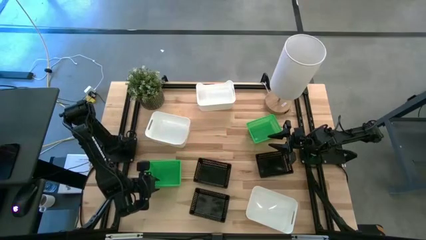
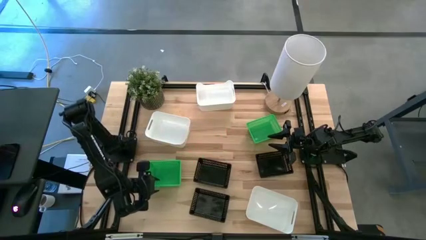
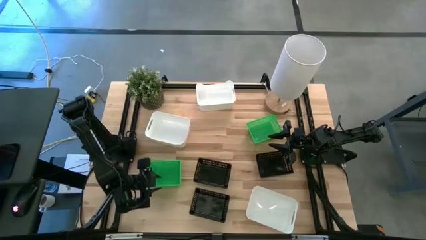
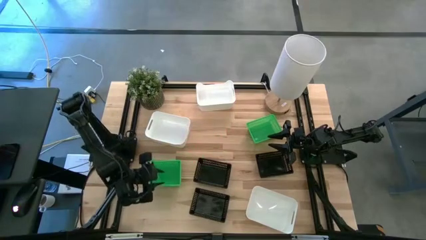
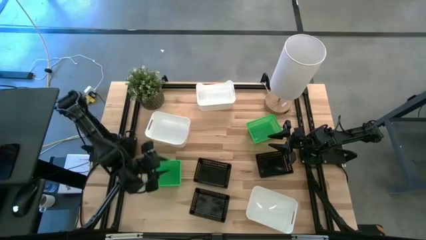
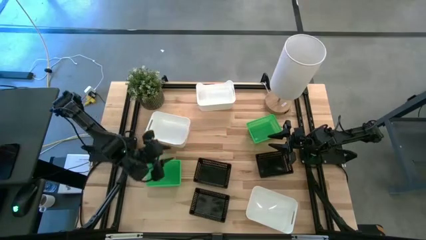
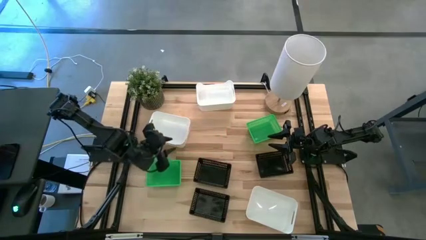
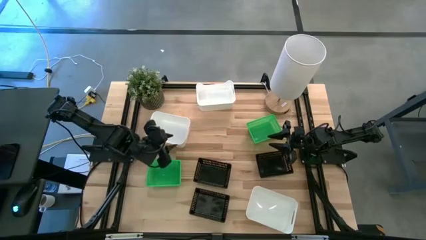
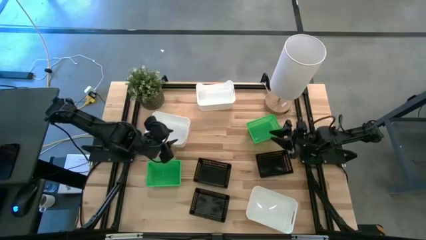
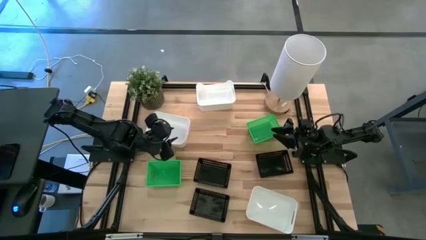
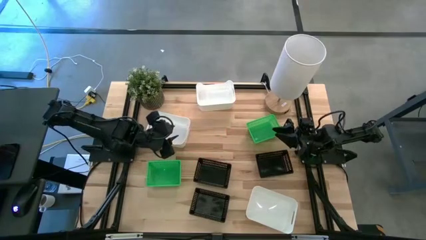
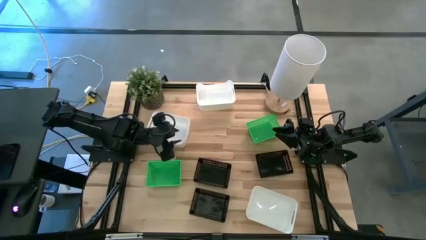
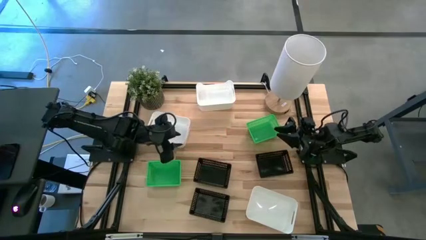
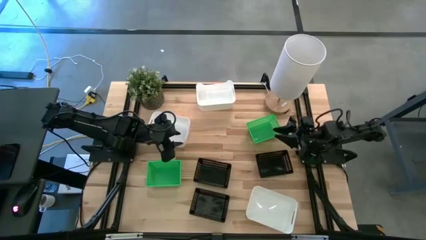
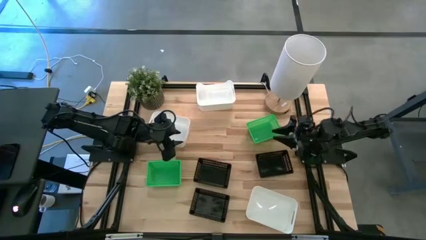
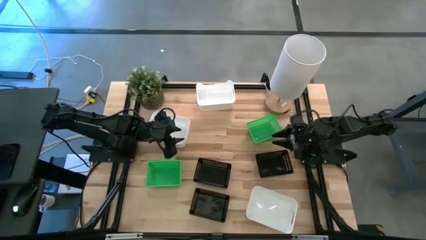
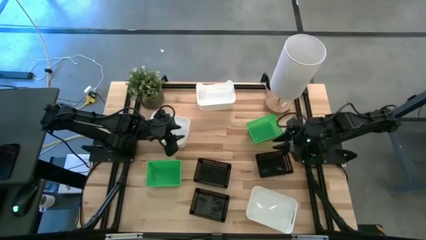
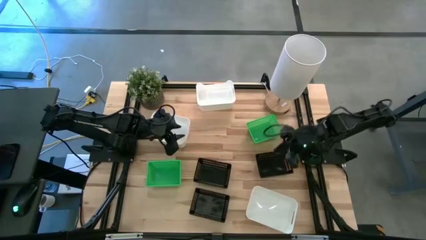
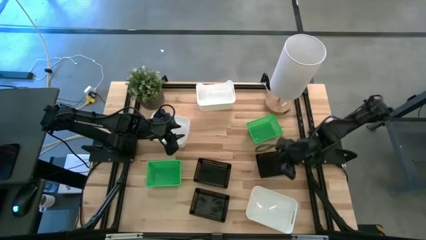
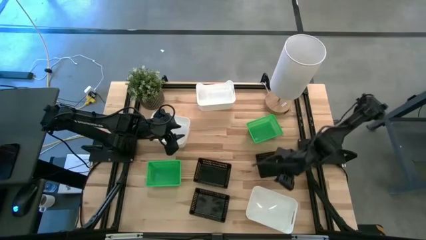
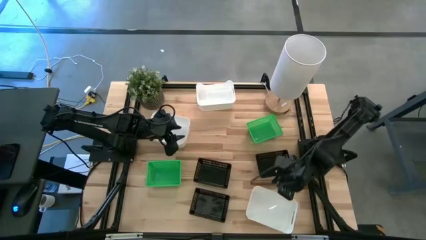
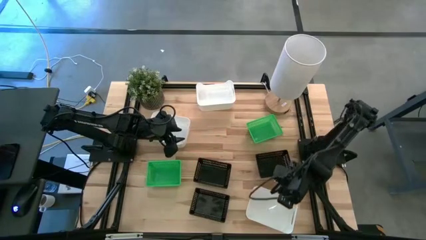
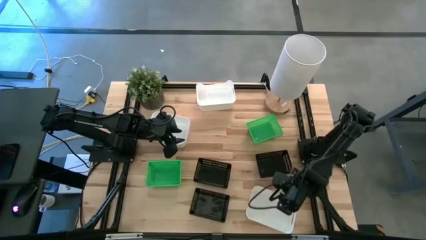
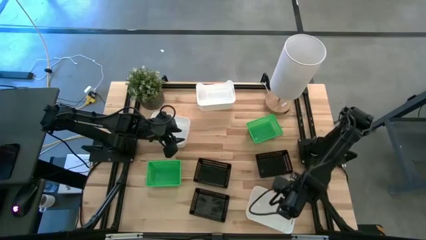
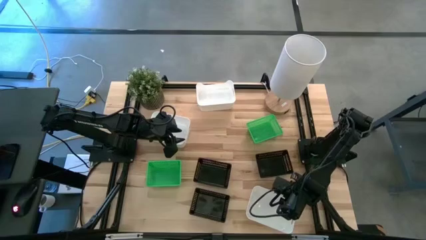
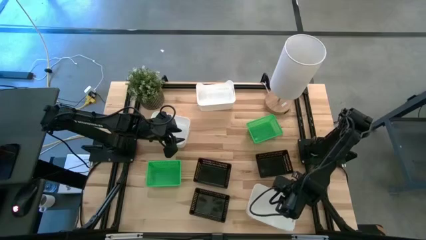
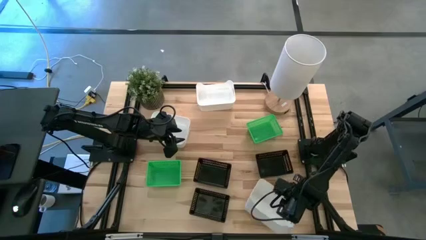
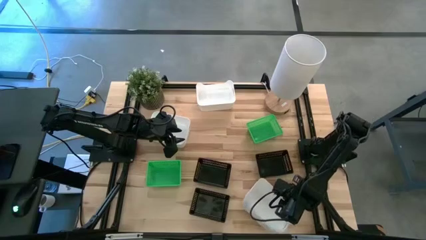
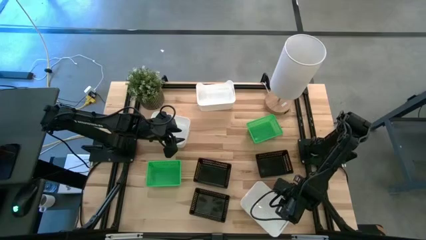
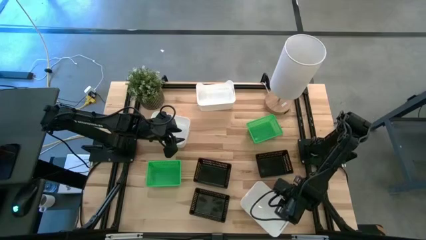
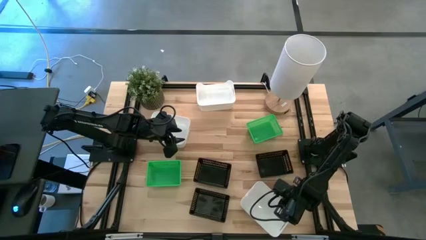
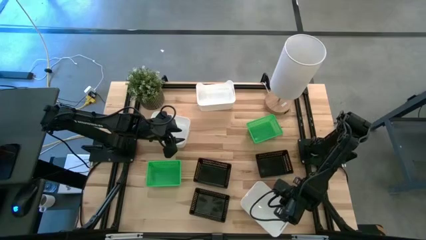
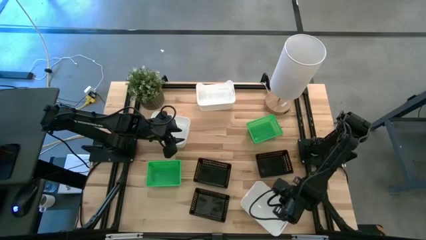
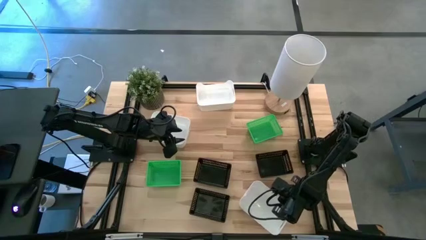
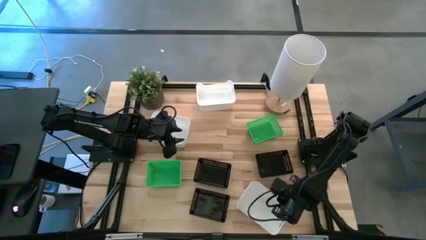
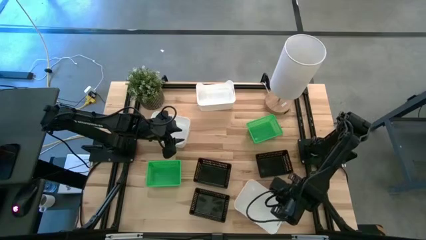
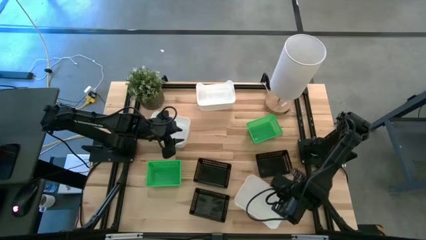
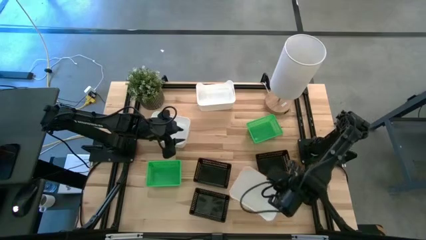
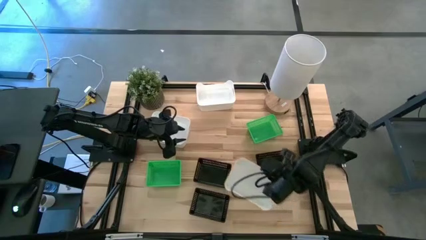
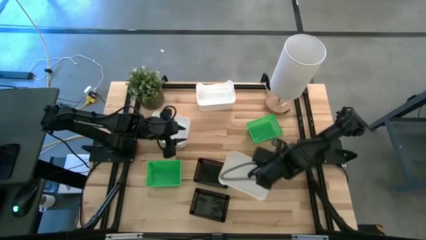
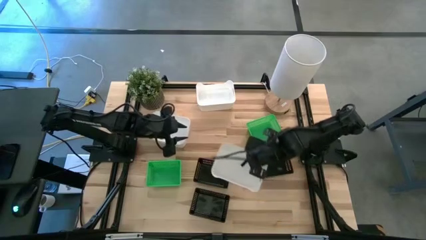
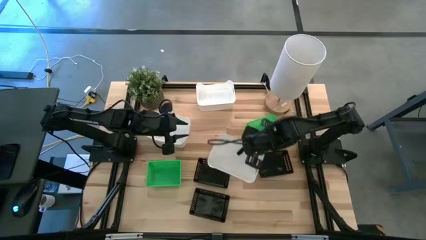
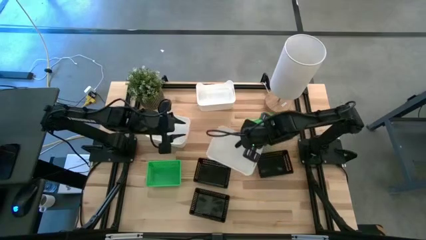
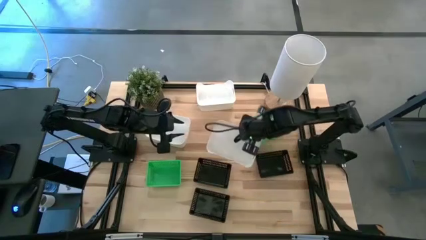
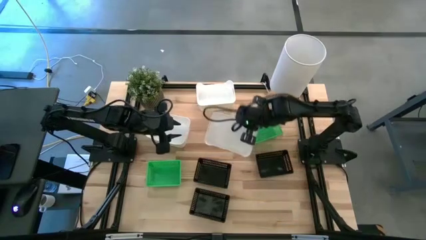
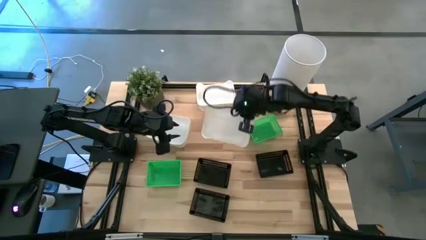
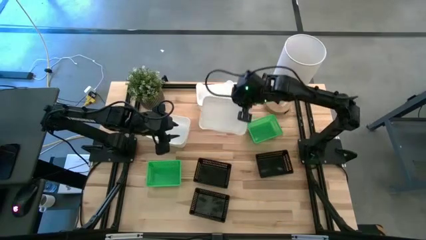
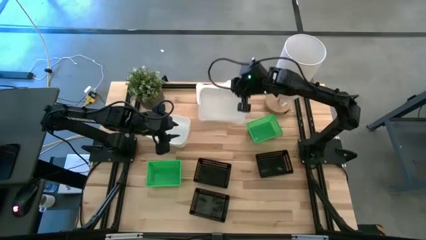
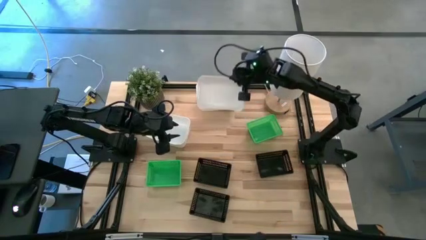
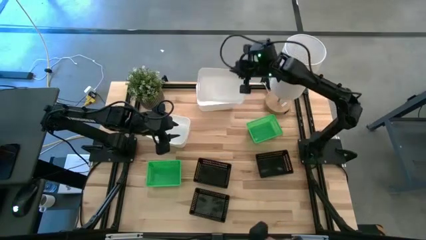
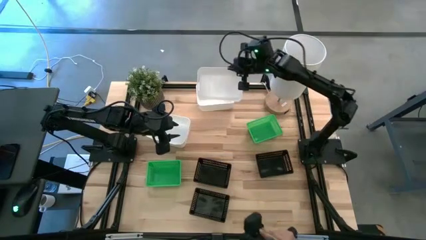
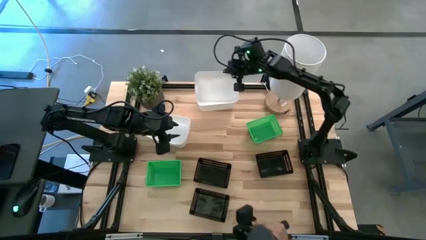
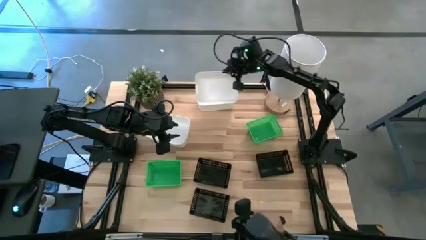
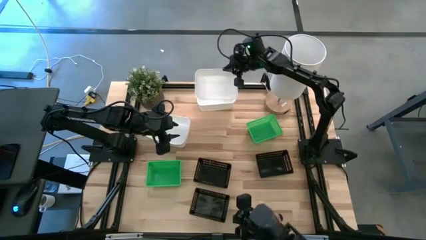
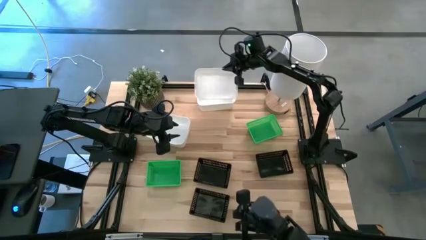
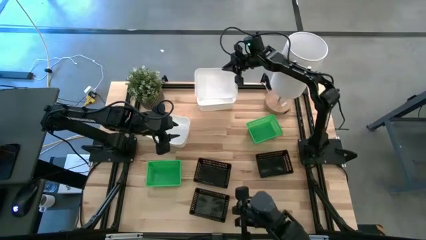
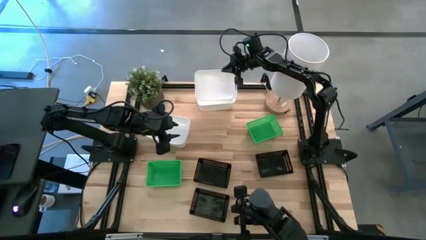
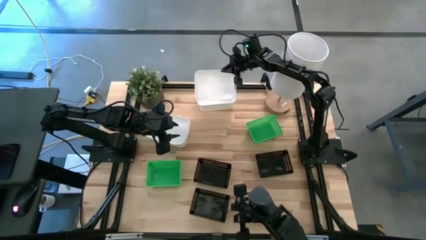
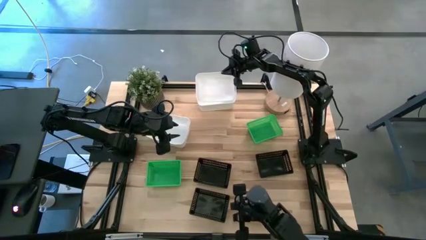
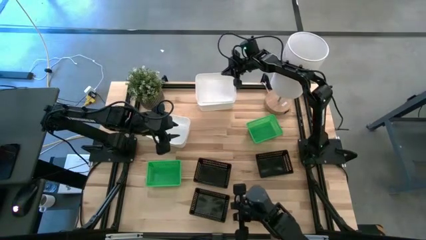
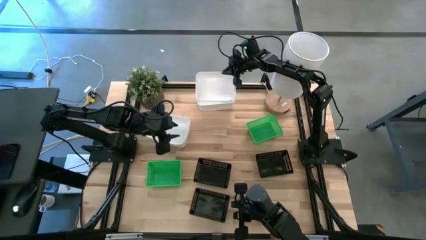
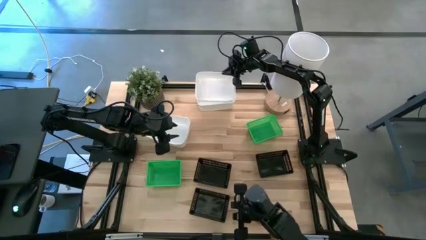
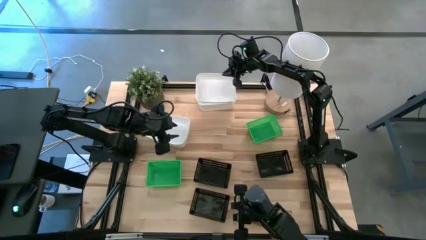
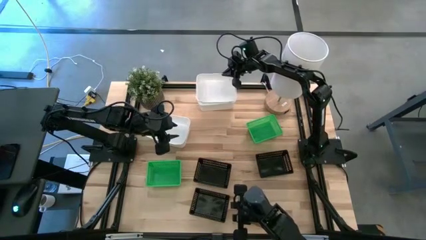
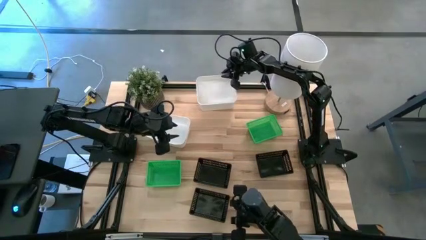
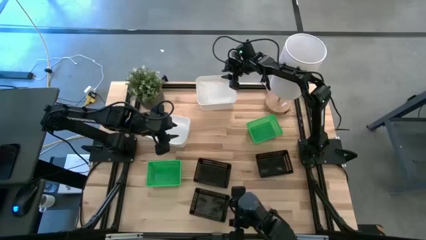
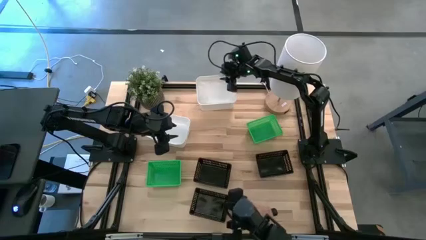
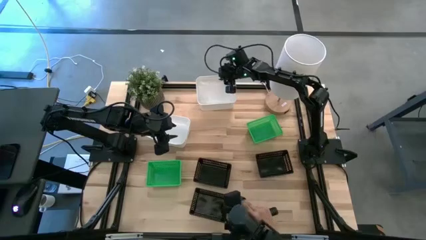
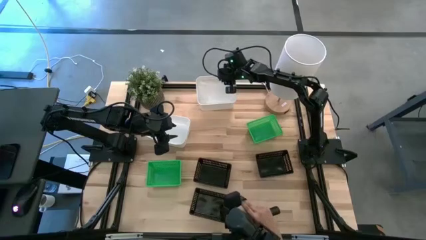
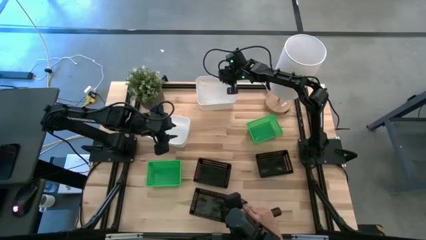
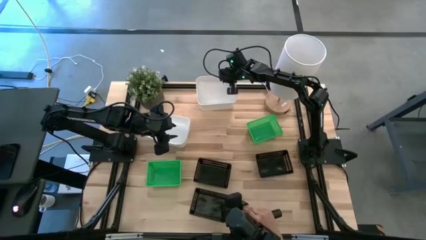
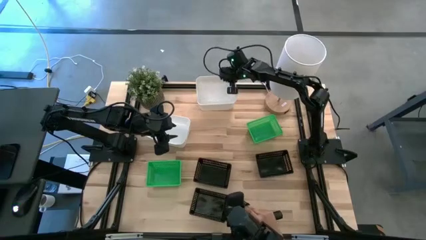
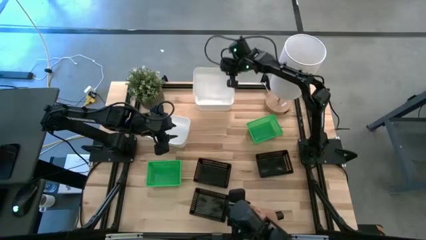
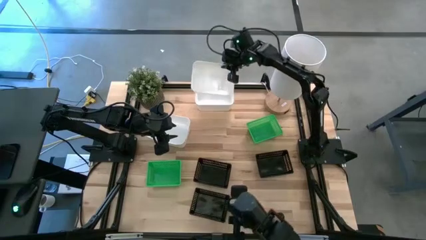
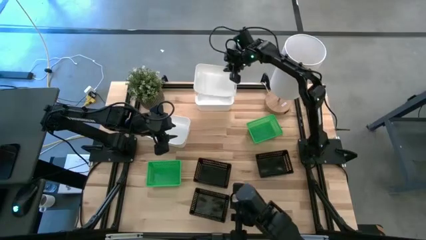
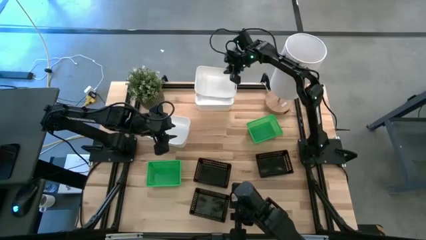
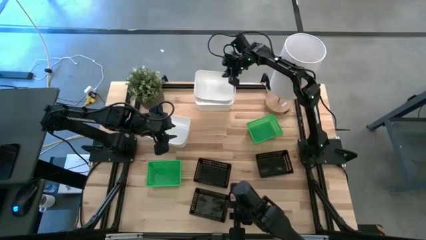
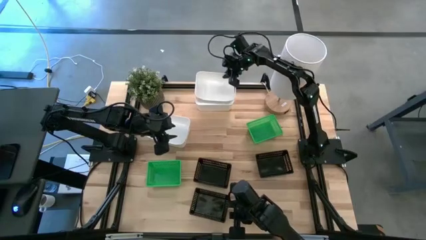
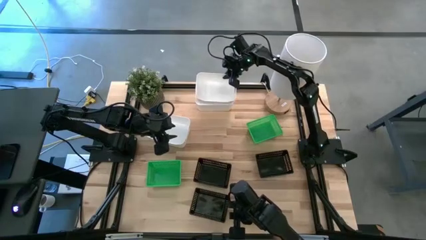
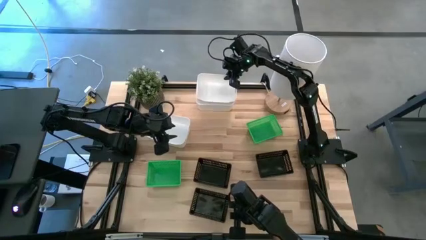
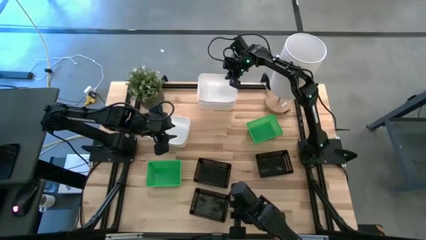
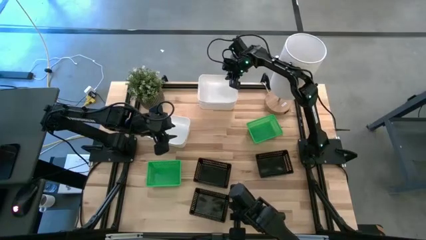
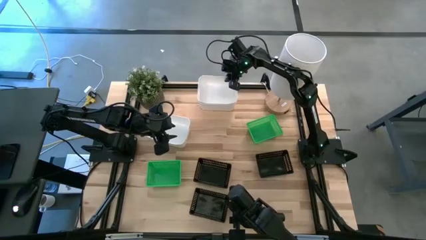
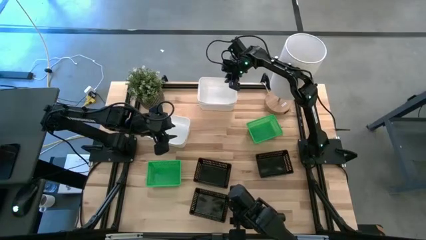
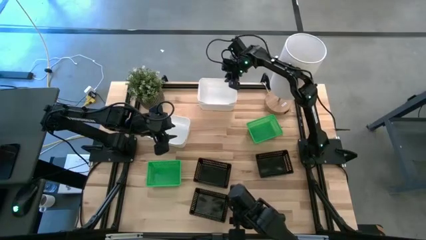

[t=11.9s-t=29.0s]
Stack the bottom white bin on the top white bin
